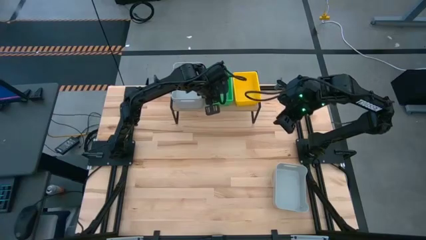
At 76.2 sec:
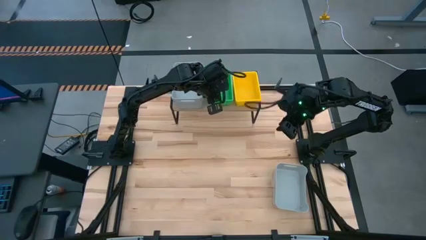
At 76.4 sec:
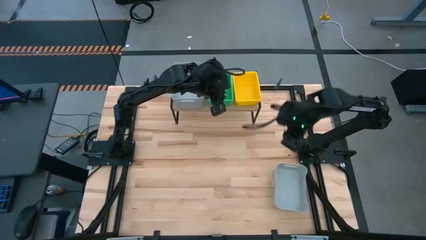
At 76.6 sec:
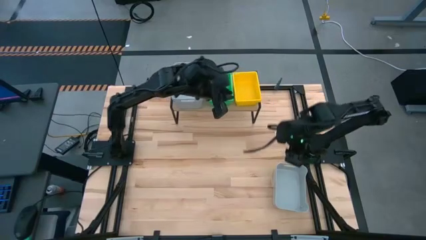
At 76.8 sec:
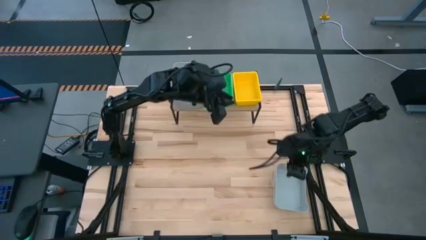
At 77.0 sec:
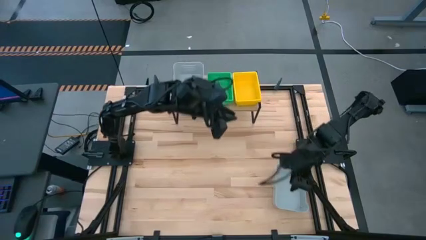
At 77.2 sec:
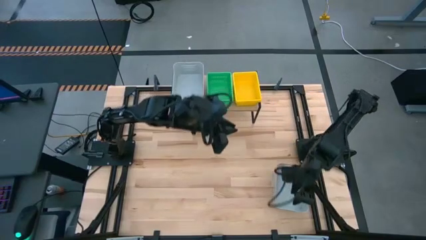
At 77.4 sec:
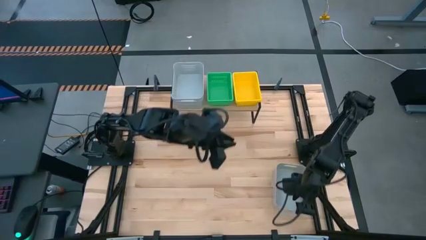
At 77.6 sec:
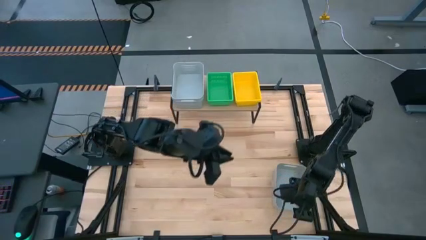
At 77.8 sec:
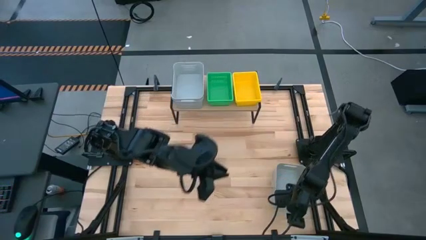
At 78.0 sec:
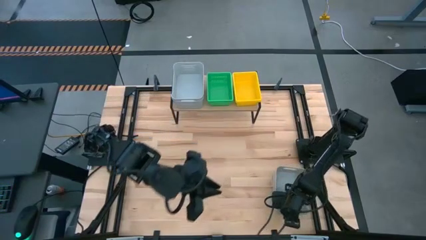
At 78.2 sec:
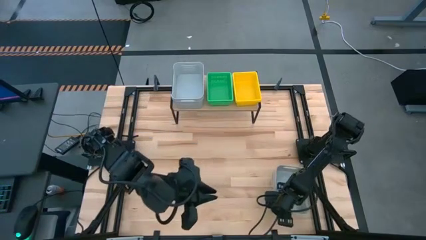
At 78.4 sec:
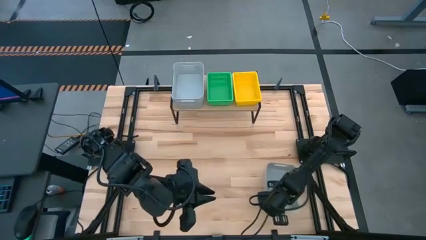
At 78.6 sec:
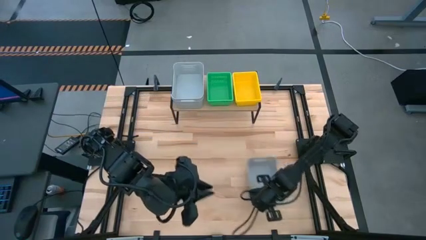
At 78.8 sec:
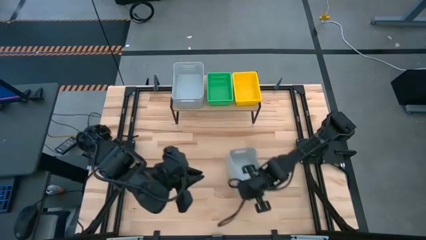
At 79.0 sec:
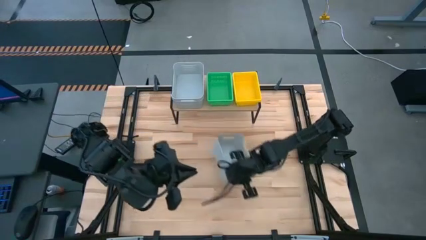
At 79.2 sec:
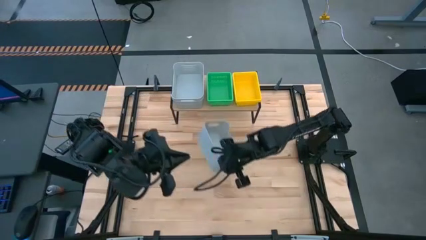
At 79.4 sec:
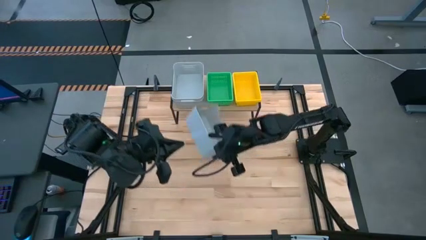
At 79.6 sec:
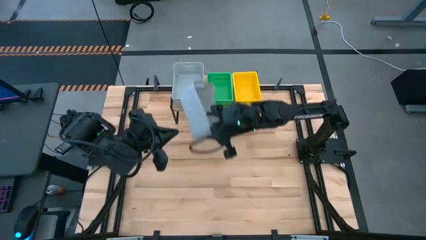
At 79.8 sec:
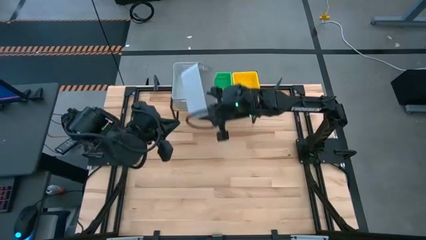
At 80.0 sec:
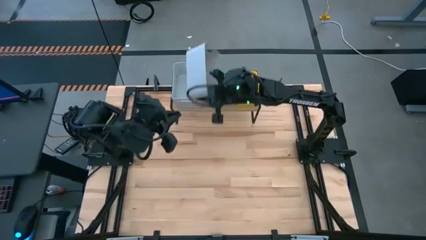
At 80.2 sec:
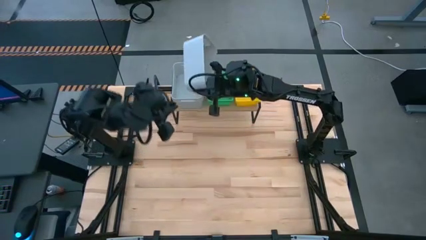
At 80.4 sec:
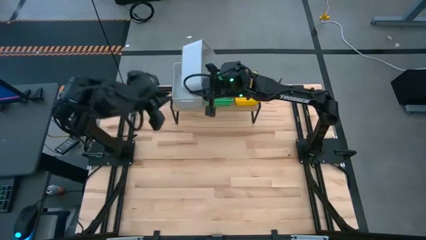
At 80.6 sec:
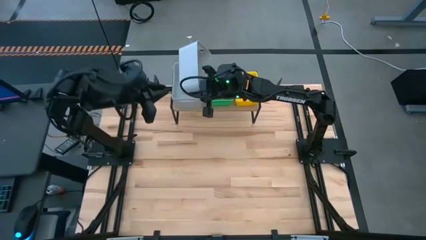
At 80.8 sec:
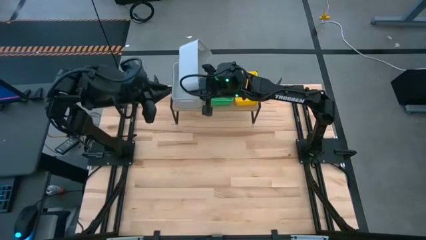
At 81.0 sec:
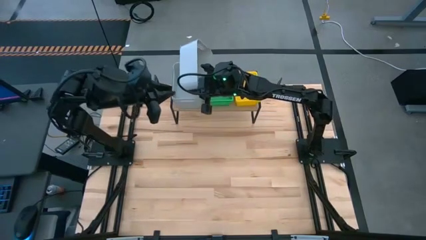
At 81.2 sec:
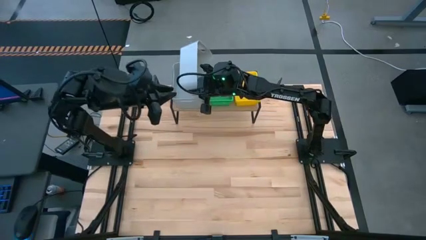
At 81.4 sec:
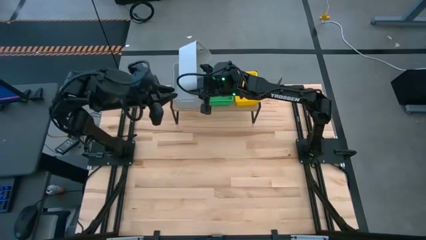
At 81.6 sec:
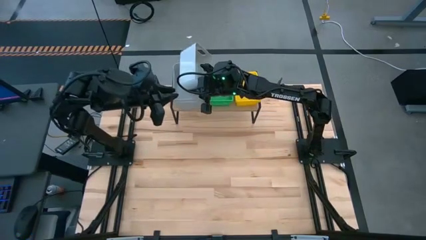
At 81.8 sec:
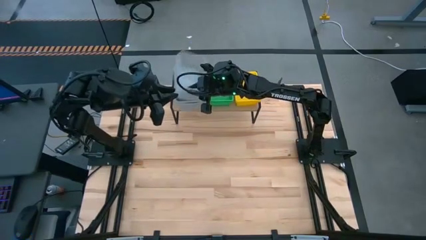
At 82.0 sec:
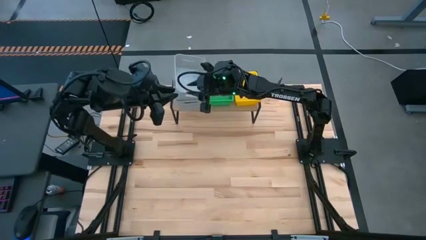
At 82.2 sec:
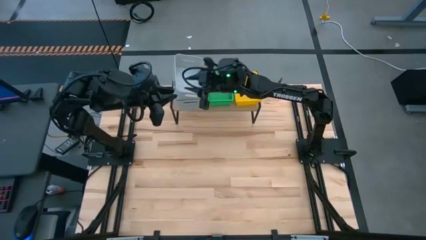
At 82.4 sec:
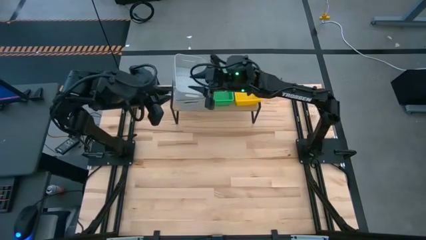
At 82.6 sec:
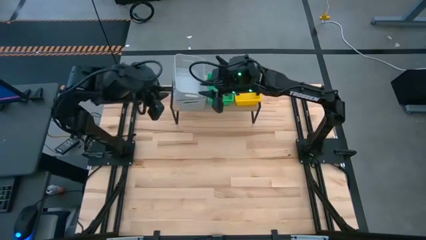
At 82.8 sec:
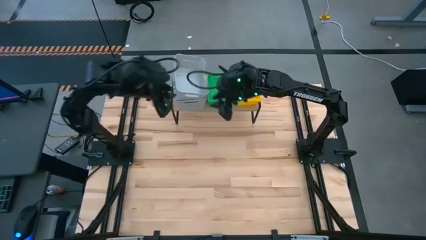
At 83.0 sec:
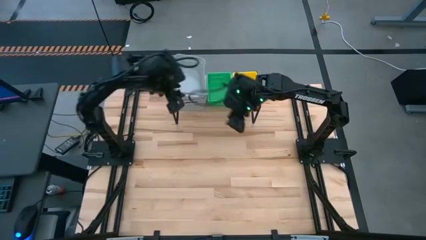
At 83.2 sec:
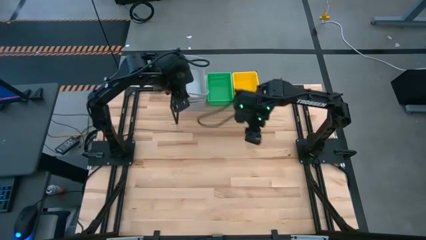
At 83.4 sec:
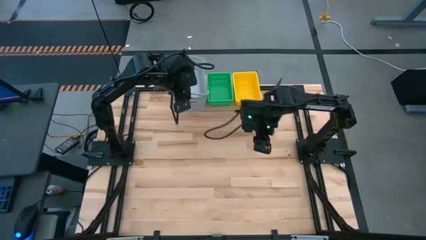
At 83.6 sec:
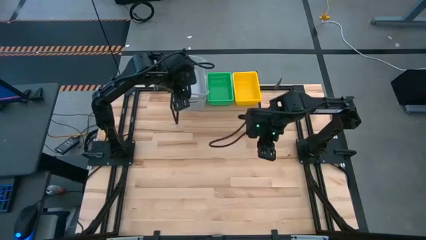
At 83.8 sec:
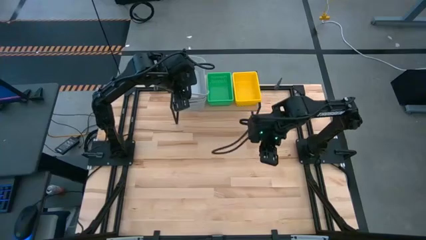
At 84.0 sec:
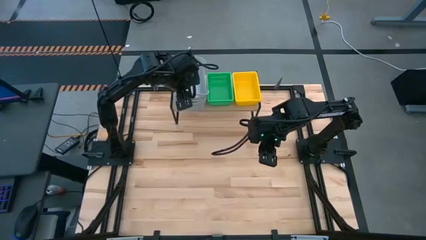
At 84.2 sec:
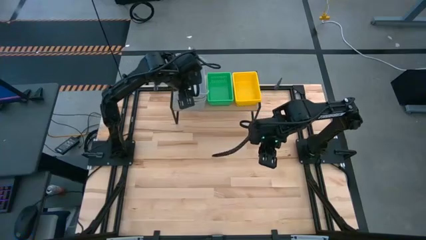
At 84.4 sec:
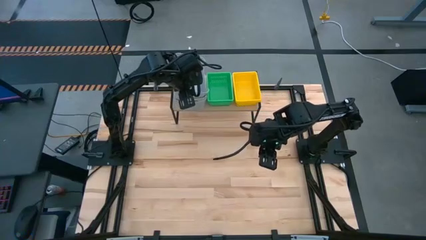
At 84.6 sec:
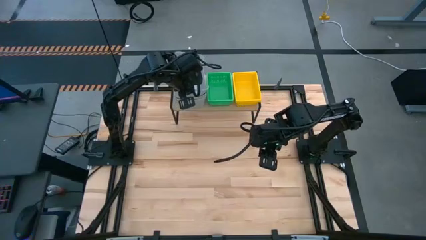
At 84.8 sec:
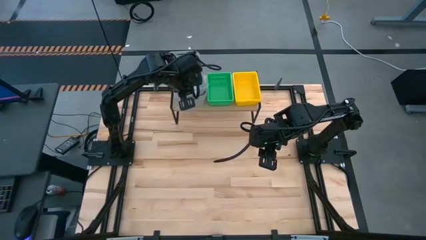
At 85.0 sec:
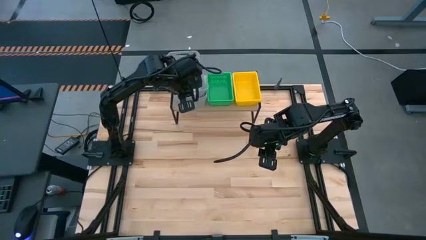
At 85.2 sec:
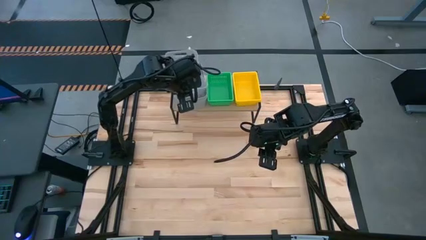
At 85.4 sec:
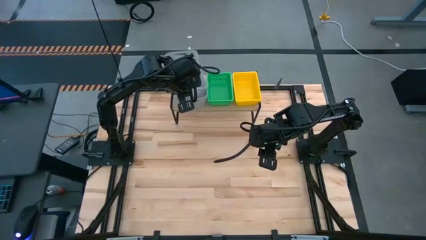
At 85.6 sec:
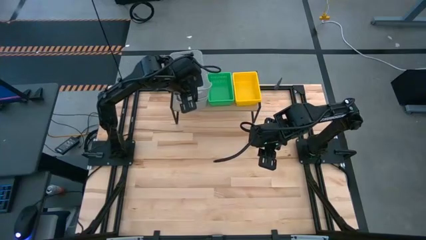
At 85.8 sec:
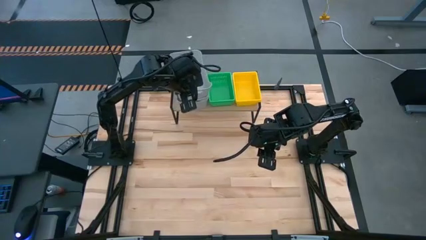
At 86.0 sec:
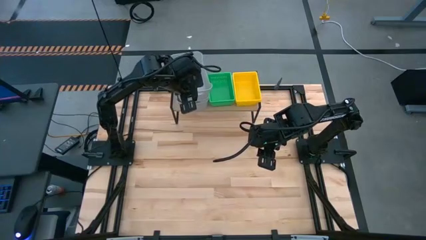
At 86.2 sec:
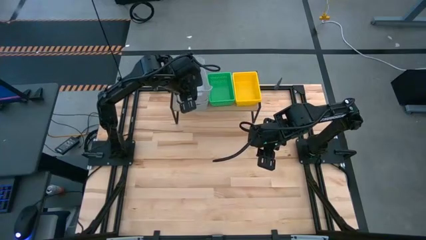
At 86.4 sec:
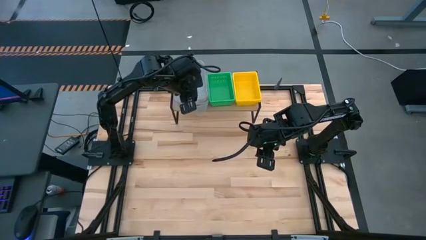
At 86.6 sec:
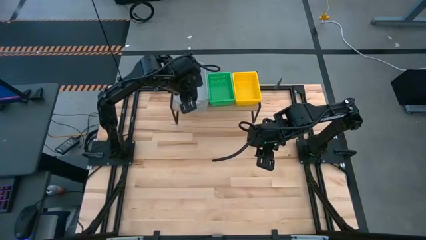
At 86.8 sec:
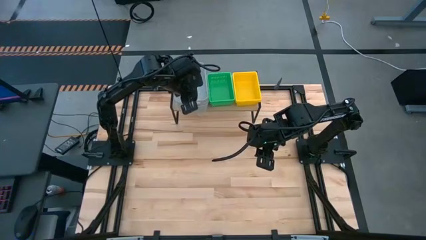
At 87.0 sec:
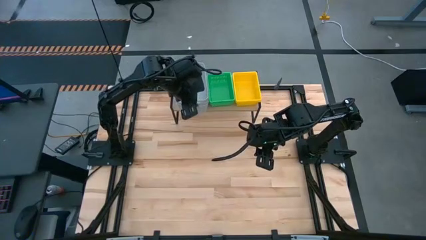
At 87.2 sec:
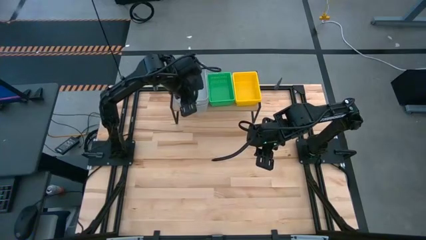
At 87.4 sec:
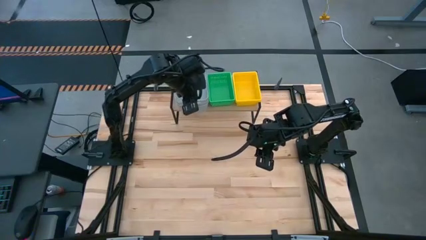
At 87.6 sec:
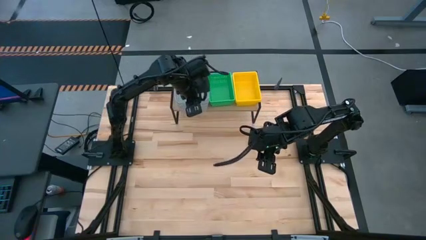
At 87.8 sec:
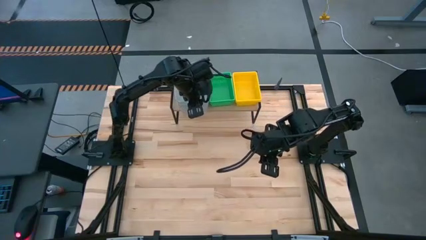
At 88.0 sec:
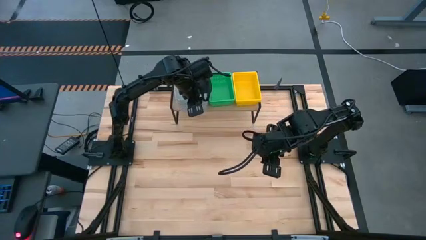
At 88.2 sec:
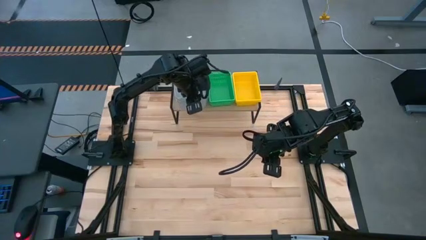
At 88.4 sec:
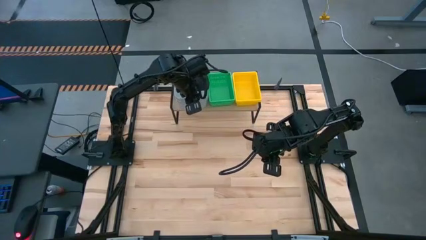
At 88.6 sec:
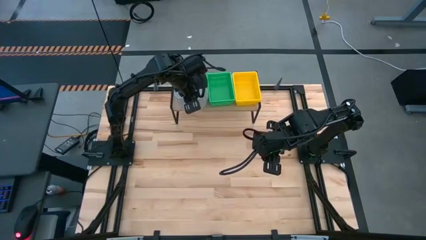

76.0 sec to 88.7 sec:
Task: Stack baskets on shelf by color
Stack the gray bin on top of the gray bin on the shelf
